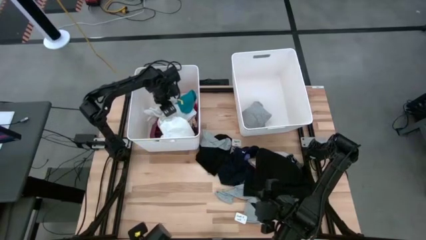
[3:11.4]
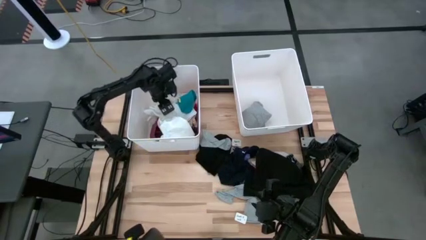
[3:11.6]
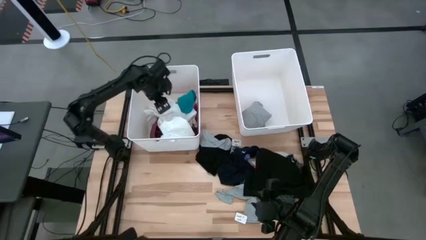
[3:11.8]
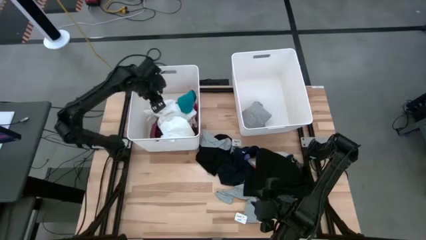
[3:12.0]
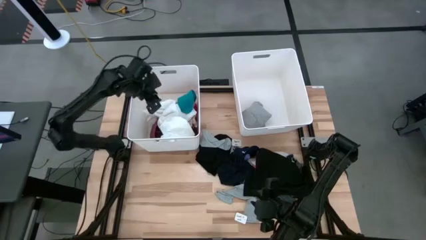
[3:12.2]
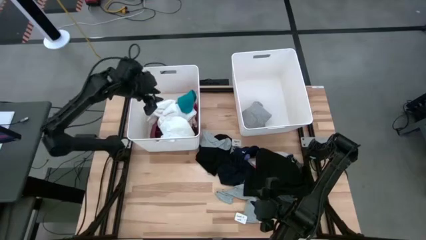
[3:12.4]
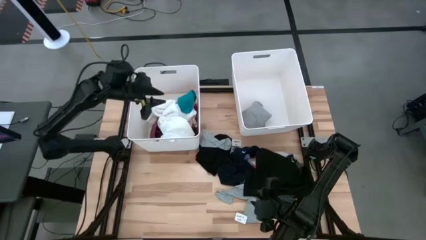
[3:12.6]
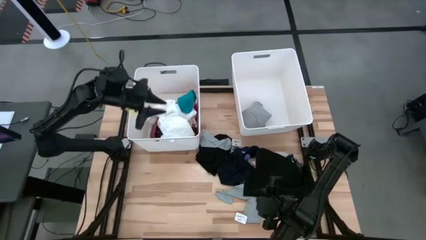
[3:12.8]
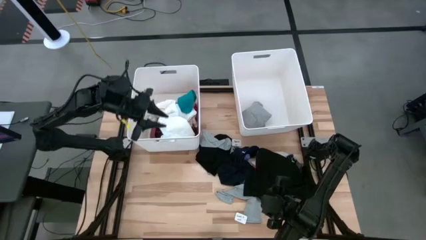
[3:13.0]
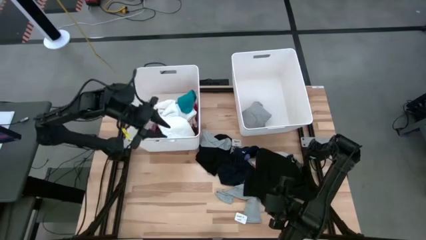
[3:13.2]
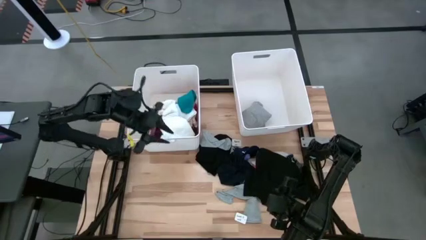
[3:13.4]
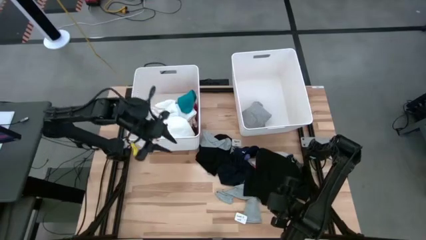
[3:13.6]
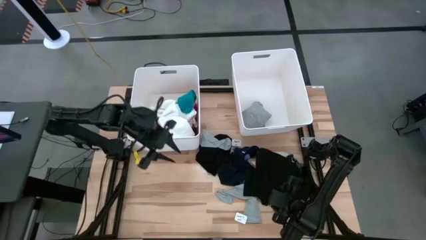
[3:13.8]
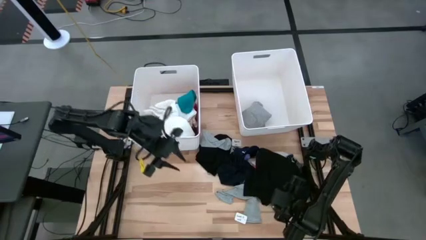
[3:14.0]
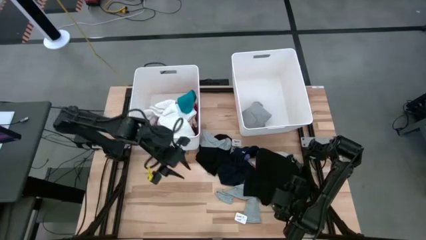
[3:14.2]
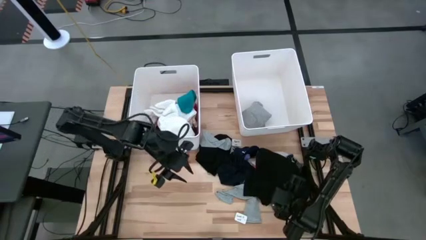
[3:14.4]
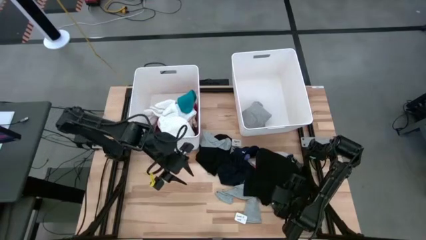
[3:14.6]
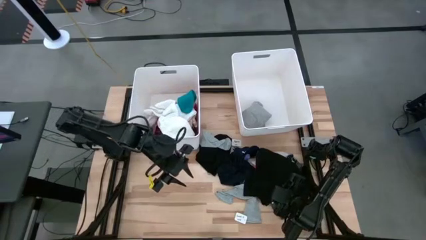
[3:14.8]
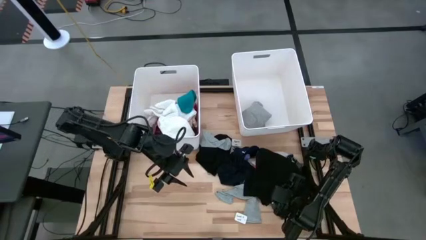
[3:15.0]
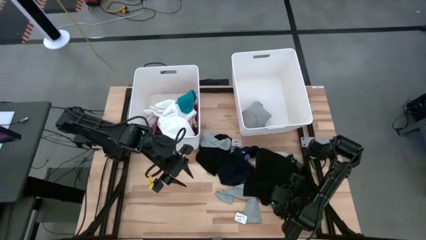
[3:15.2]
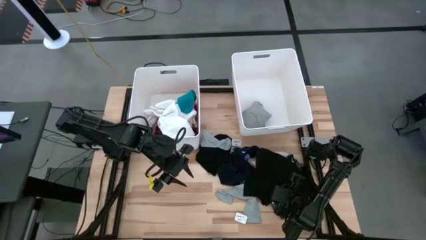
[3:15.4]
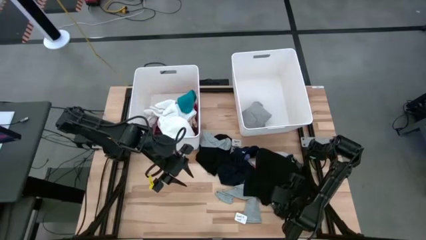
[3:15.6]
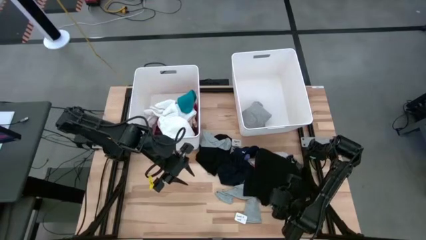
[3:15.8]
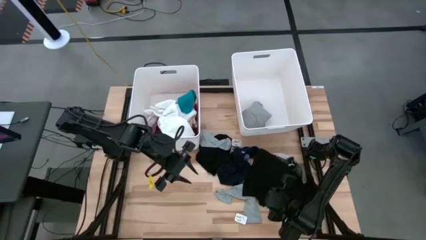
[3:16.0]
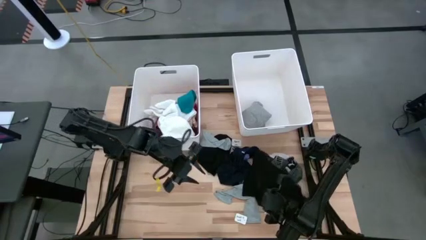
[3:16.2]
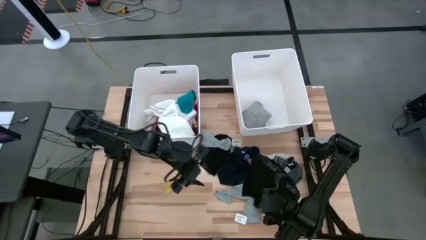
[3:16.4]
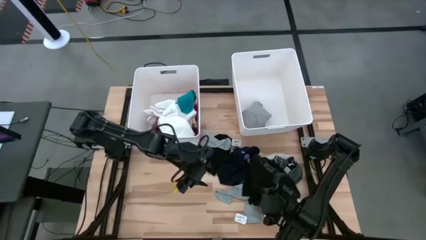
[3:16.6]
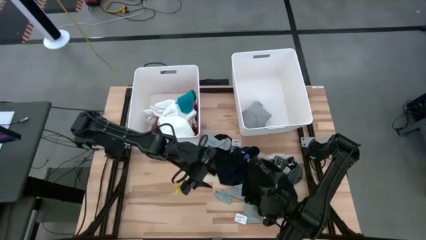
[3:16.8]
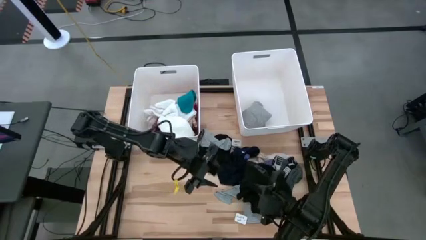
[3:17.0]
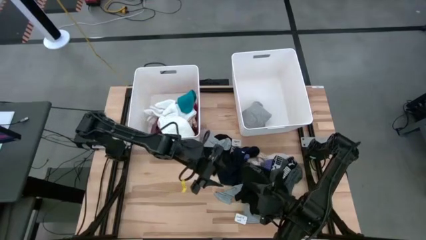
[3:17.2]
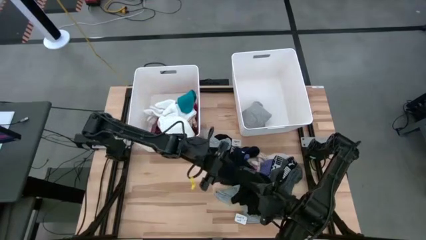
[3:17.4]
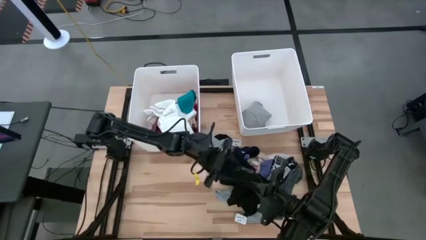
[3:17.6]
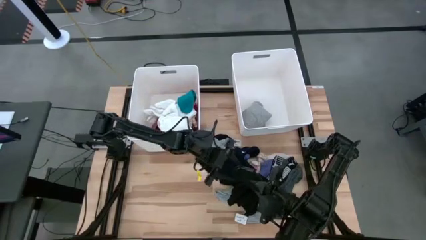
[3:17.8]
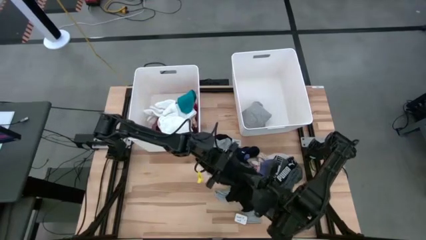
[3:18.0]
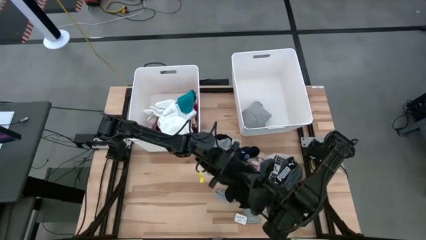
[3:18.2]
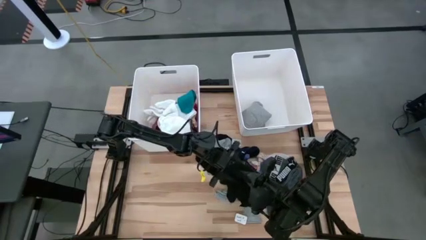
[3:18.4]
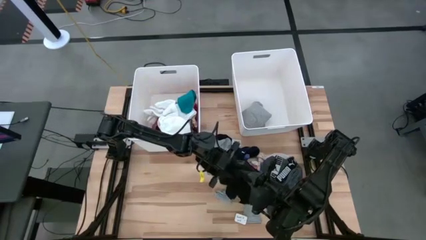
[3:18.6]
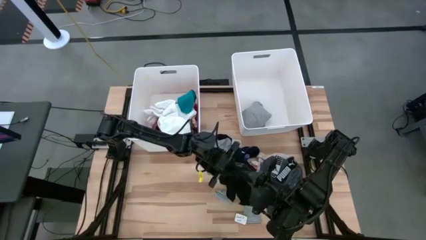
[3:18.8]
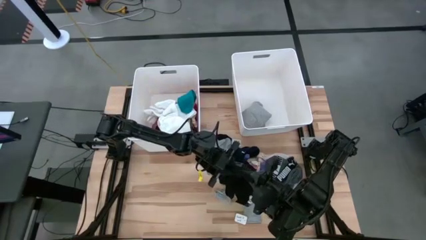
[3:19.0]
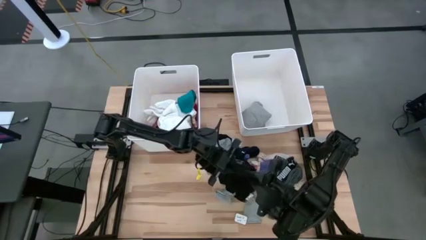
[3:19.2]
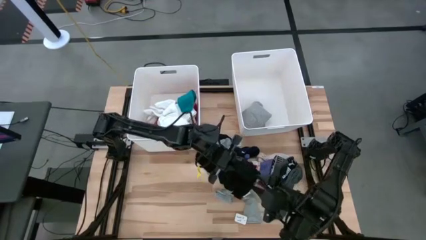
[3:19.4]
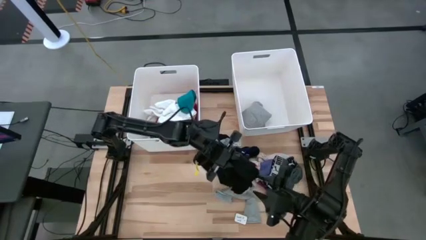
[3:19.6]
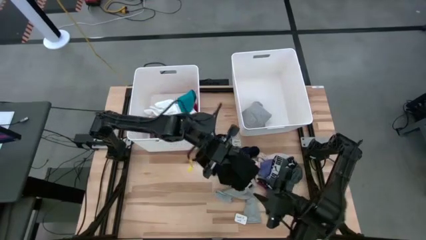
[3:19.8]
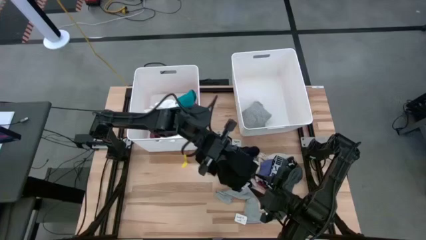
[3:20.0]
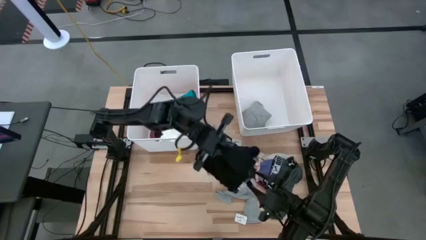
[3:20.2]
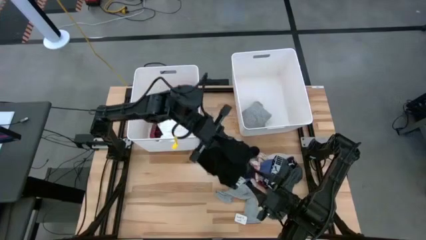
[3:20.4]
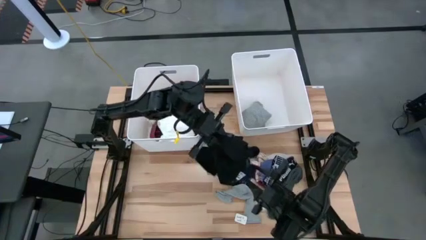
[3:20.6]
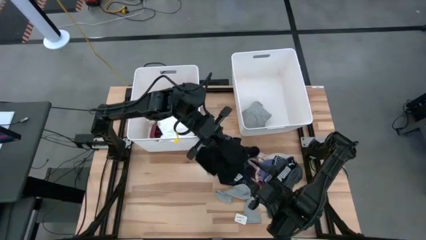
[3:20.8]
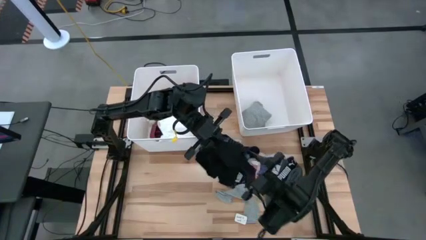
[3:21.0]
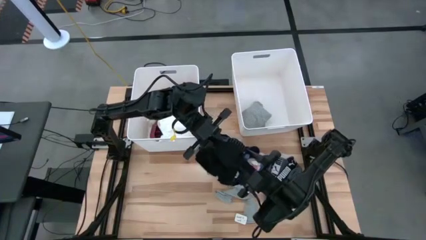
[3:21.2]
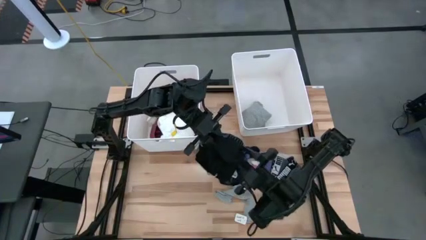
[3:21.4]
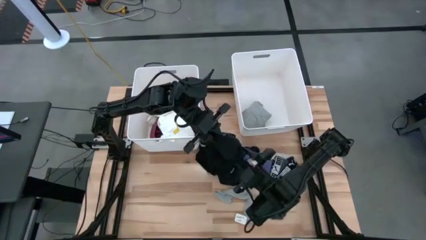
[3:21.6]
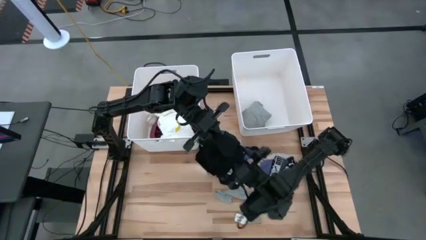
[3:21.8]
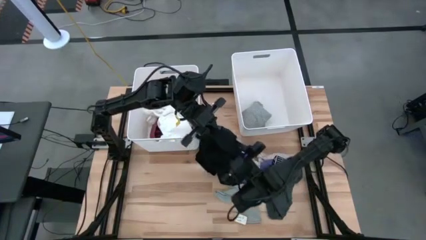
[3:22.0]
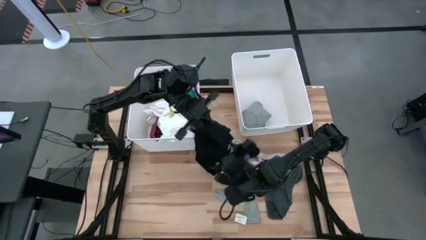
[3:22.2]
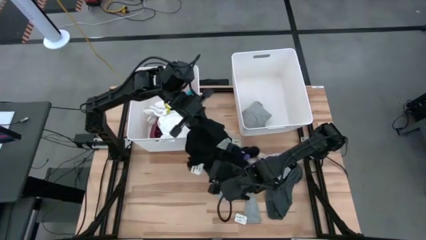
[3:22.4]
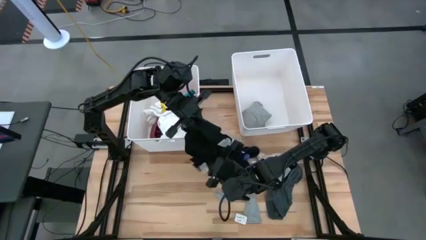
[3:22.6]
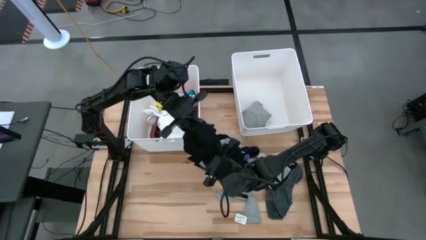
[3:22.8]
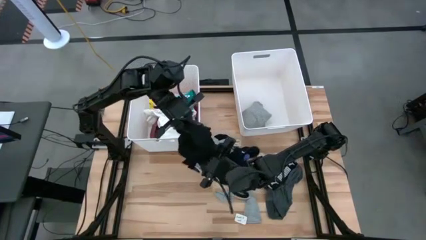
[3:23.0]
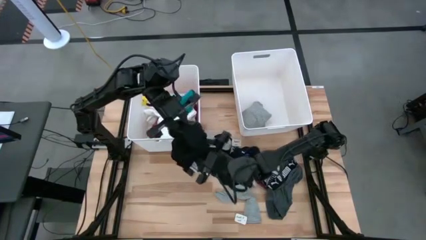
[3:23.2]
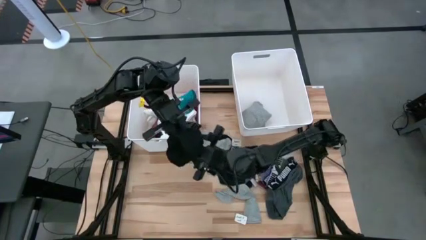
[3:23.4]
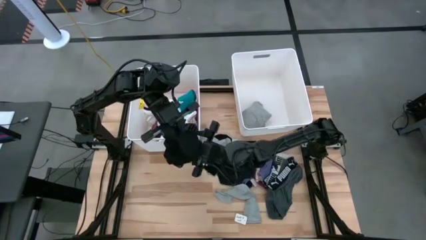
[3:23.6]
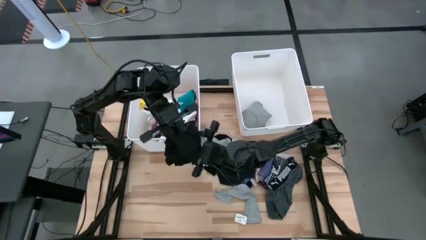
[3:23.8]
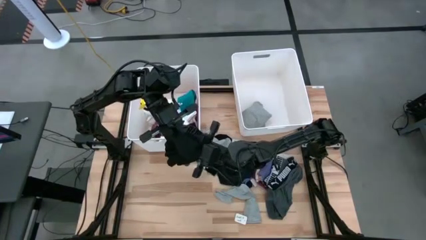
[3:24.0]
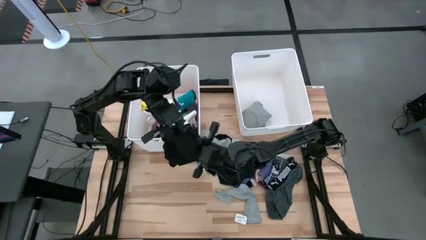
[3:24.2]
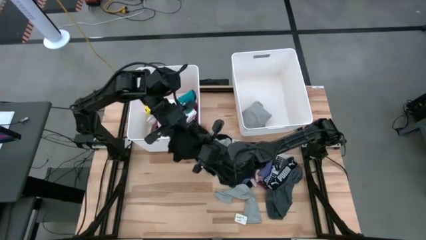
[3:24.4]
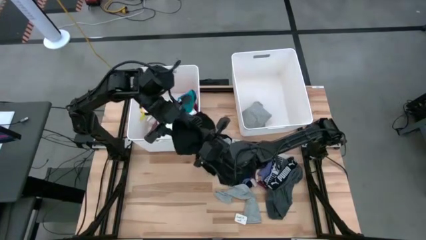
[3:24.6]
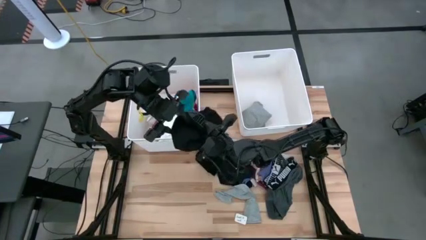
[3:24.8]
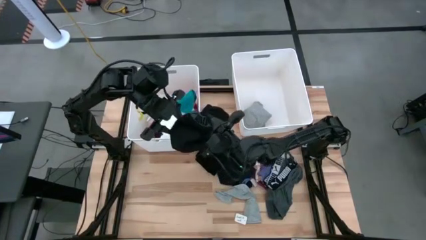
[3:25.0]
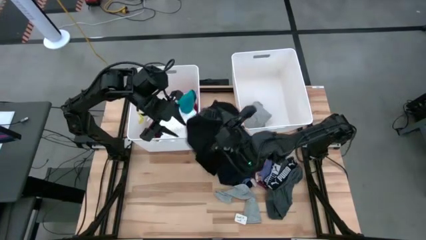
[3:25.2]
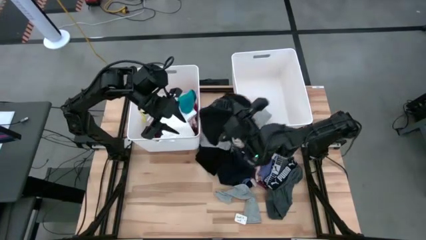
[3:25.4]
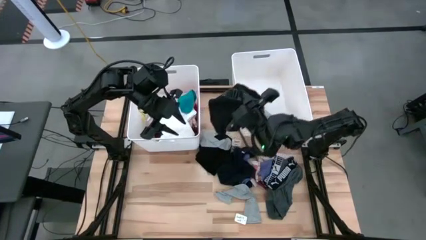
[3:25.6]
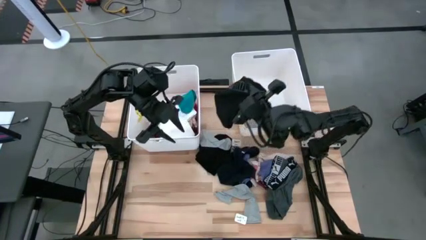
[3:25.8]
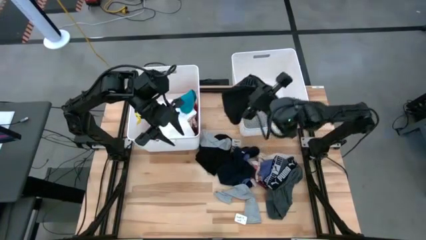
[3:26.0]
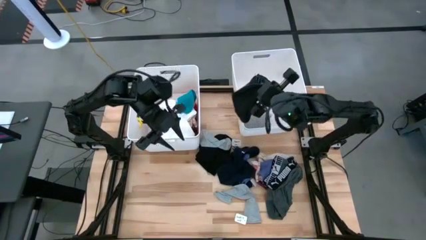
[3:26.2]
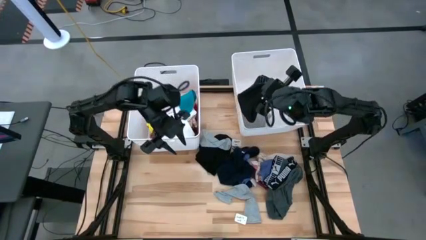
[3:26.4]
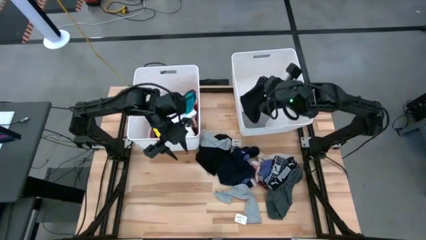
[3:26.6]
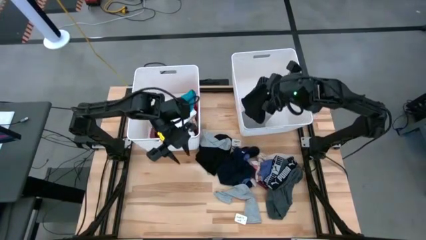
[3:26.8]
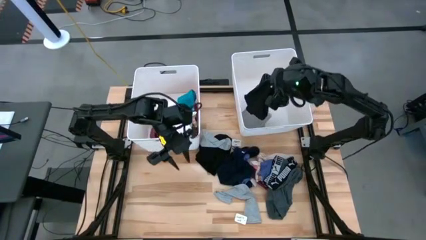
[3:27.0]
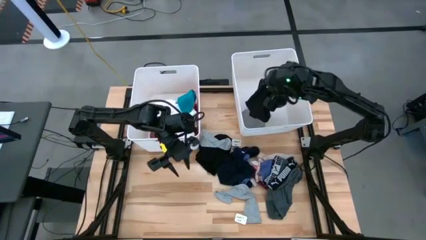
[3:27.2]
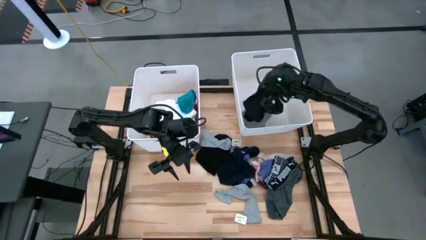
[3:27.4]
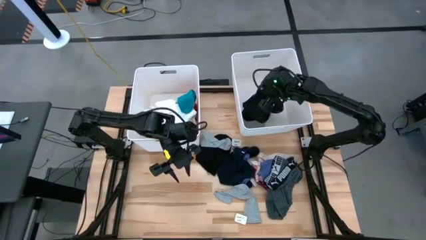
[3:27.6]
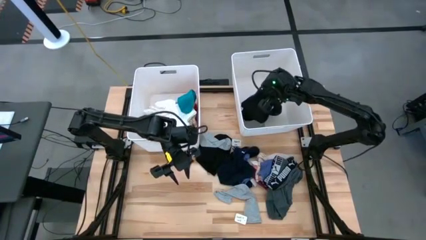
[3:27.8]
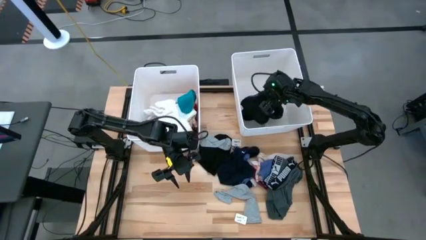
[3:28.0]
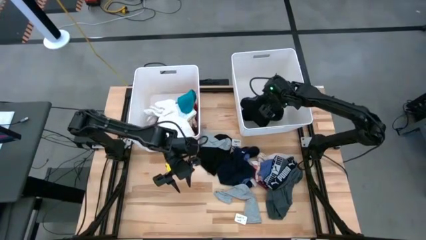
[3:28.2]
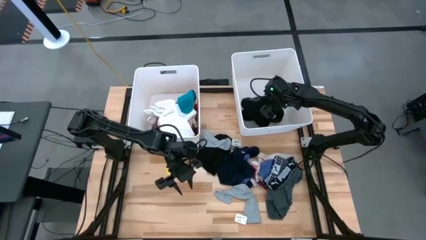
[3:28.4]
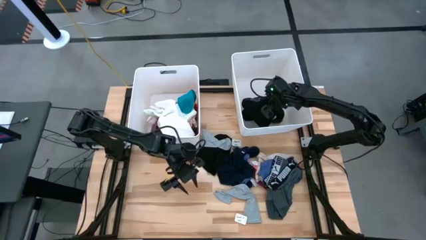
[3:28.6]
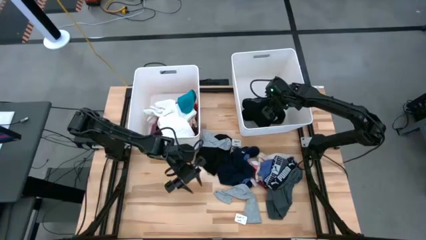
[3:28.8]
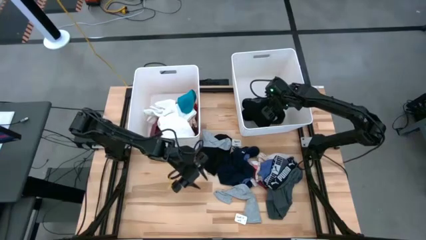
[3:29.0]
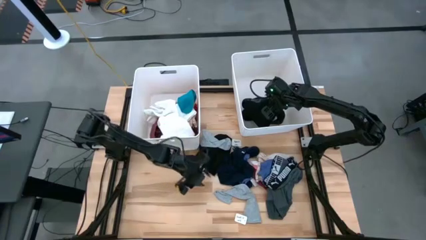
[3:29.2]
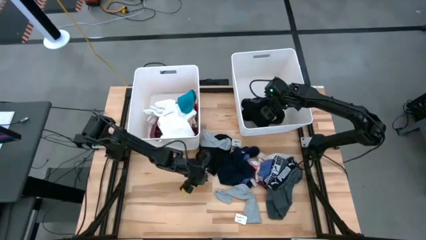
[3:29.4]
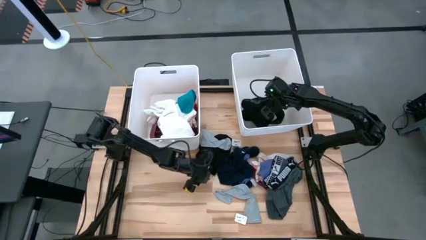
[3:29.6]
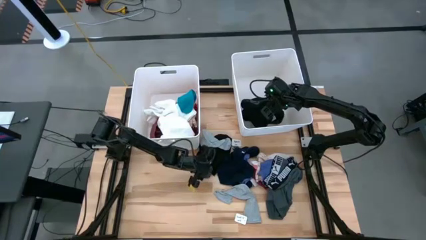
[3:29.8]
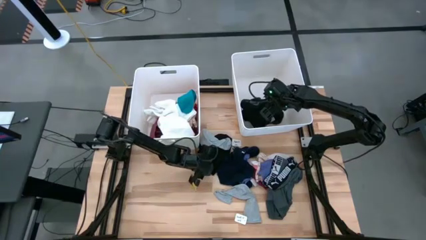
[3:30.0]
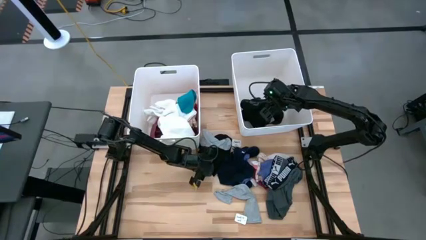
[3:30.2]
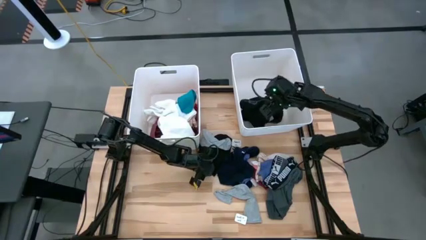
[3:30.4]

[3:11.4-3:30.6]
Task: Sort clothes
Put the black underwear into the right white bin
